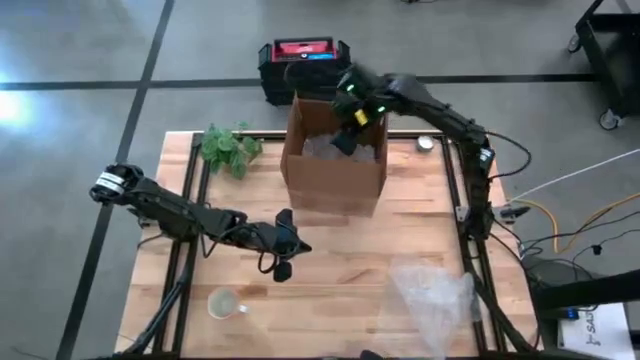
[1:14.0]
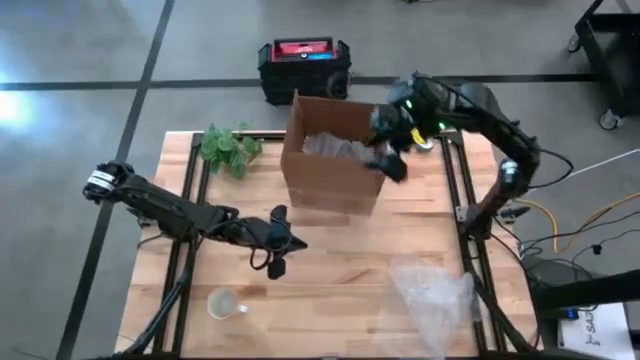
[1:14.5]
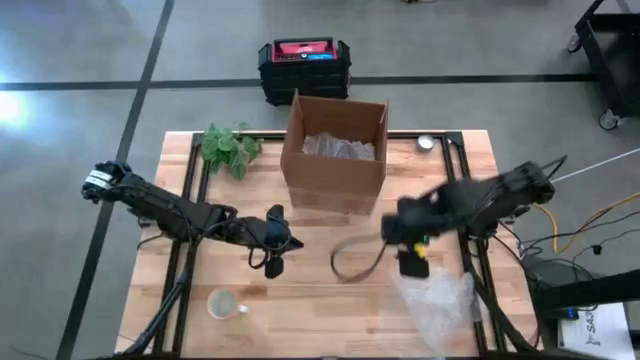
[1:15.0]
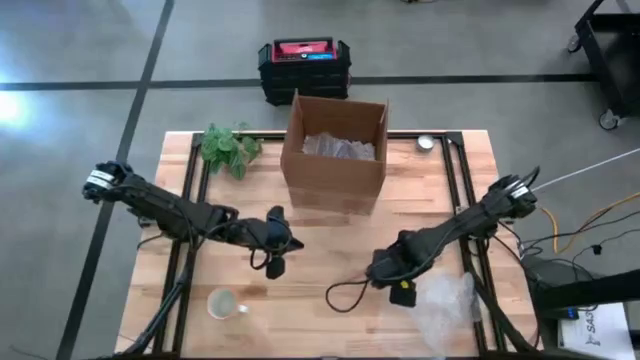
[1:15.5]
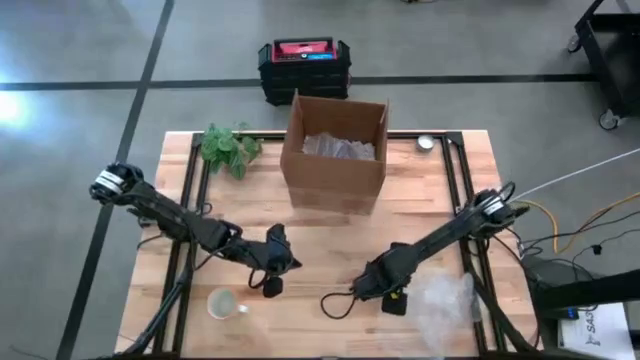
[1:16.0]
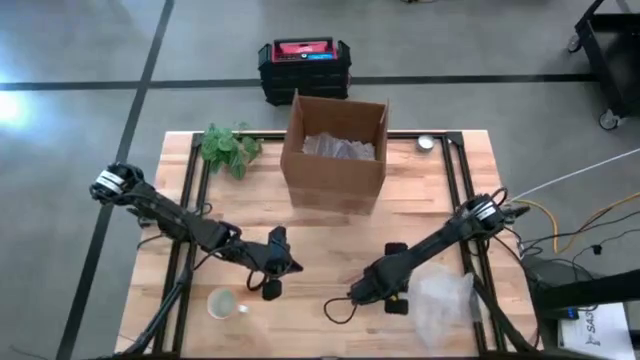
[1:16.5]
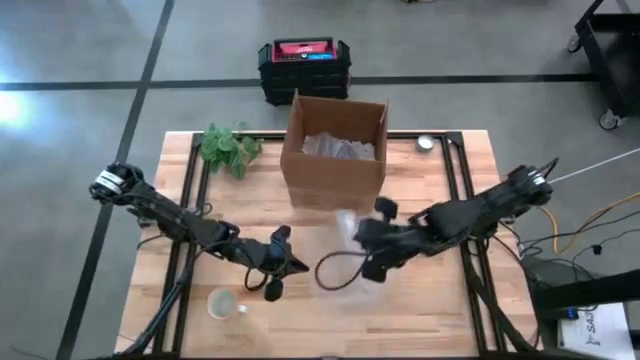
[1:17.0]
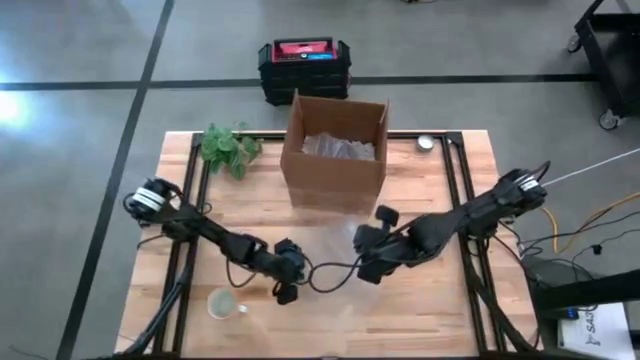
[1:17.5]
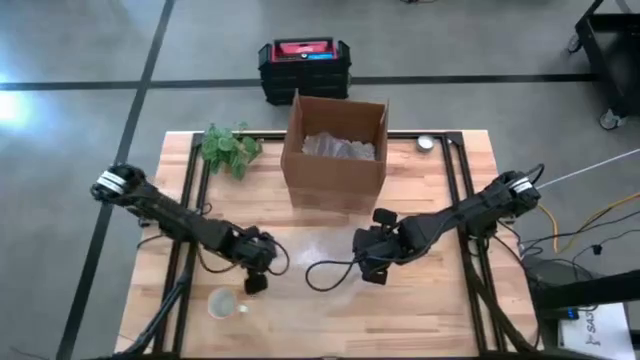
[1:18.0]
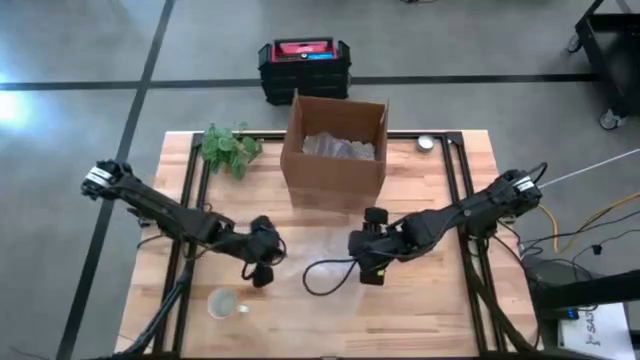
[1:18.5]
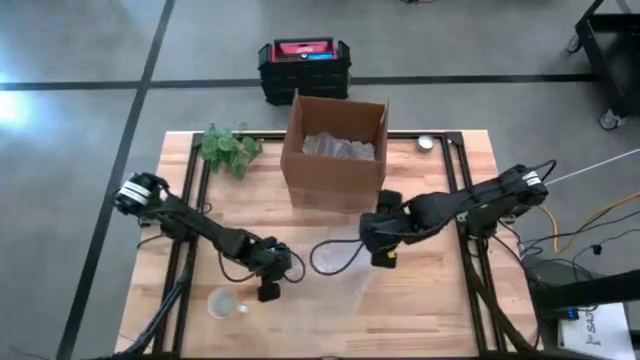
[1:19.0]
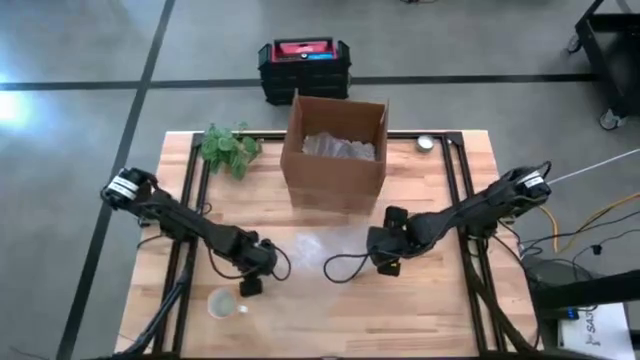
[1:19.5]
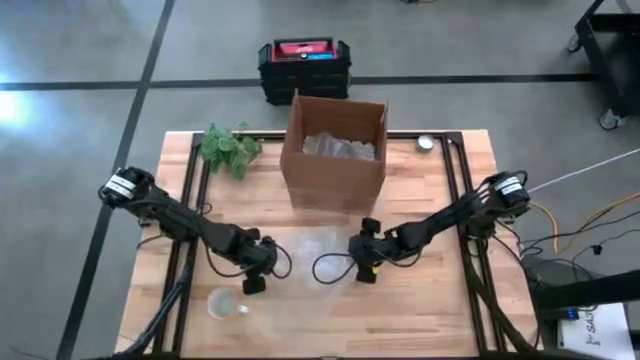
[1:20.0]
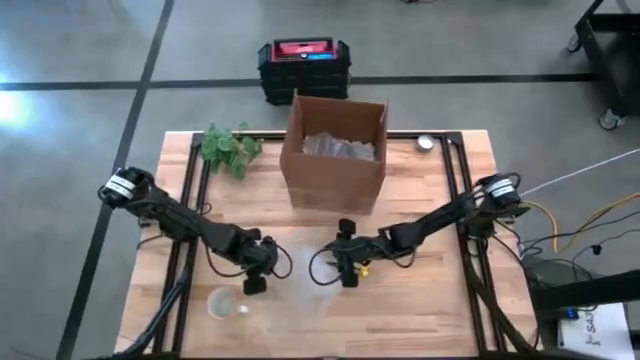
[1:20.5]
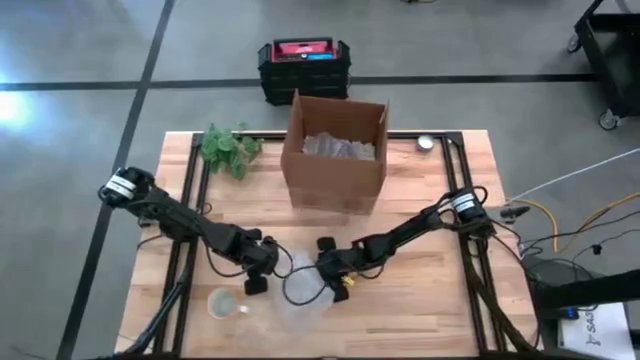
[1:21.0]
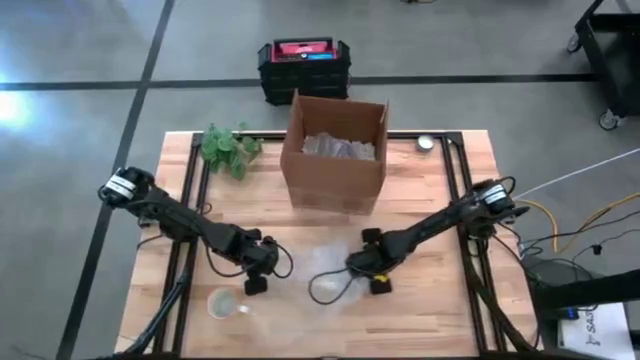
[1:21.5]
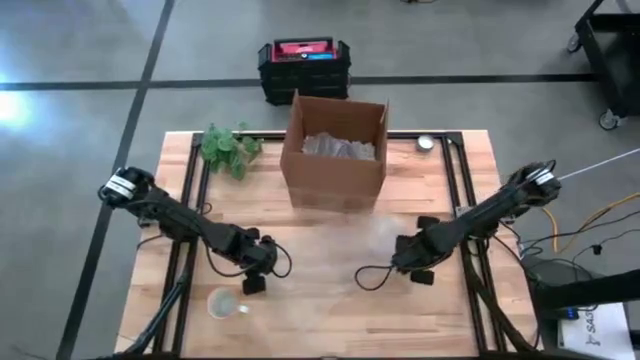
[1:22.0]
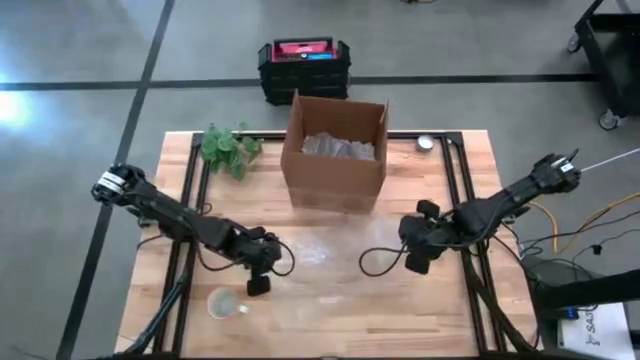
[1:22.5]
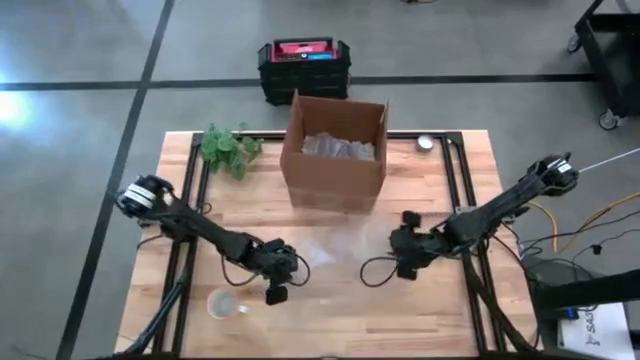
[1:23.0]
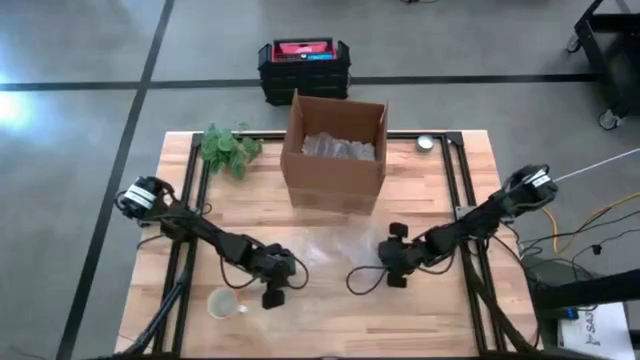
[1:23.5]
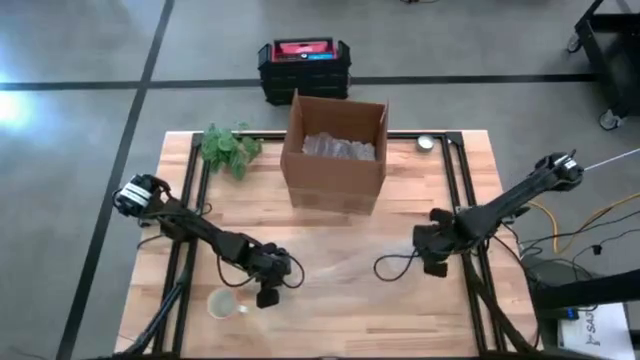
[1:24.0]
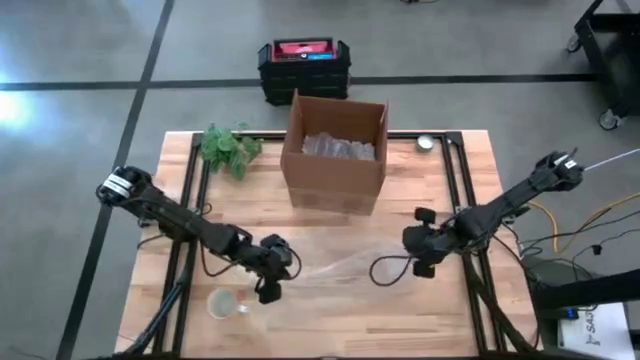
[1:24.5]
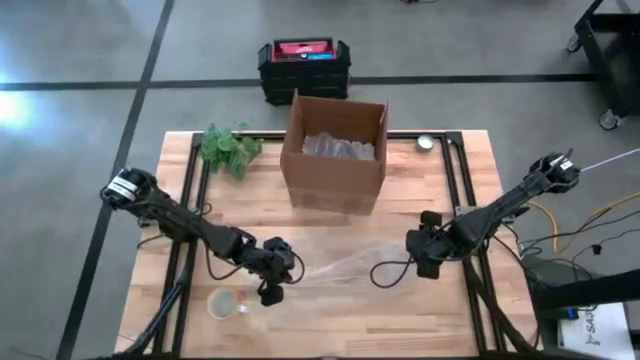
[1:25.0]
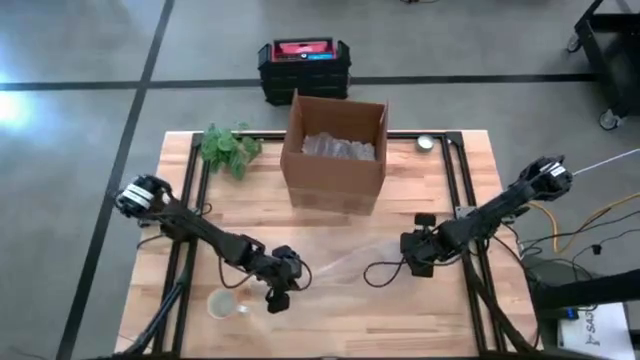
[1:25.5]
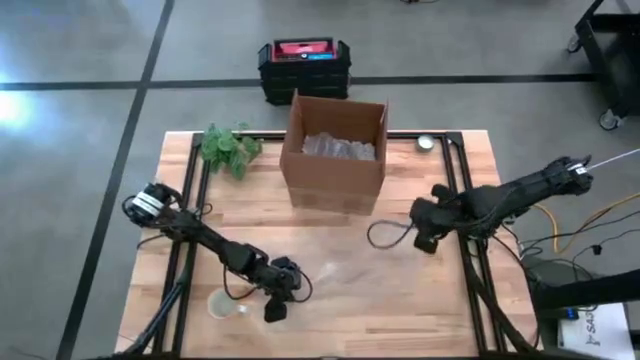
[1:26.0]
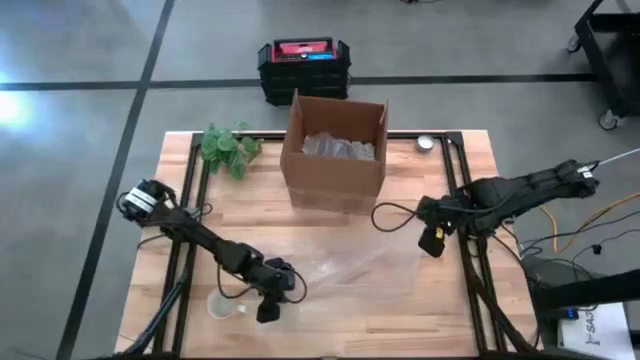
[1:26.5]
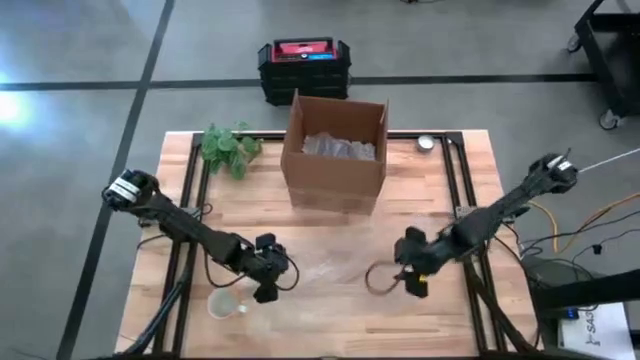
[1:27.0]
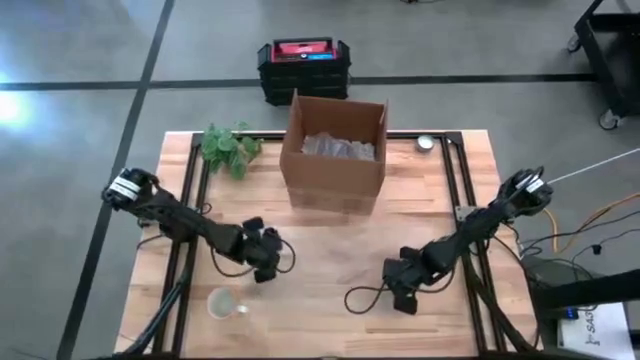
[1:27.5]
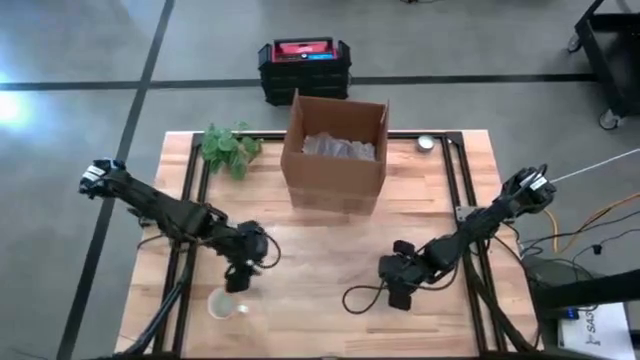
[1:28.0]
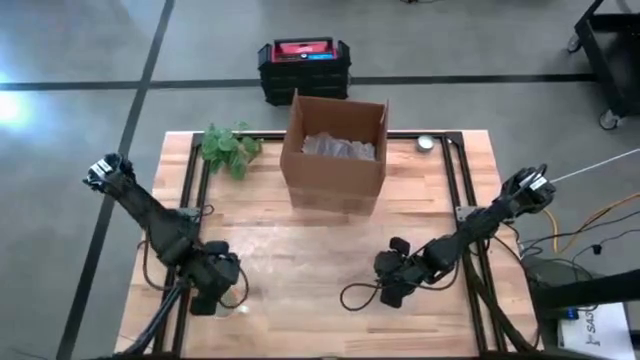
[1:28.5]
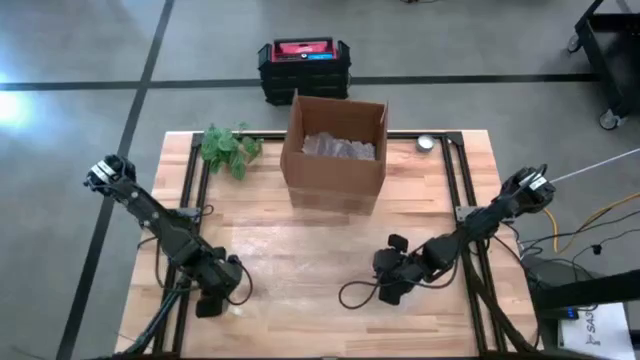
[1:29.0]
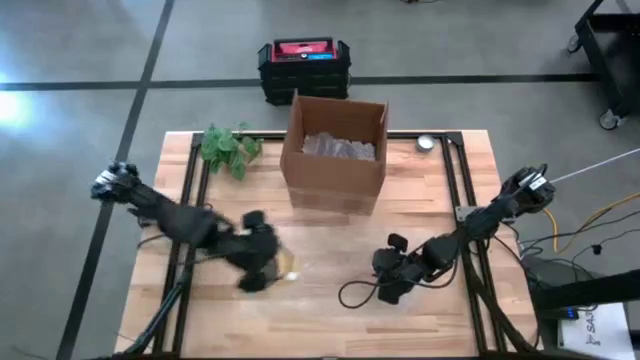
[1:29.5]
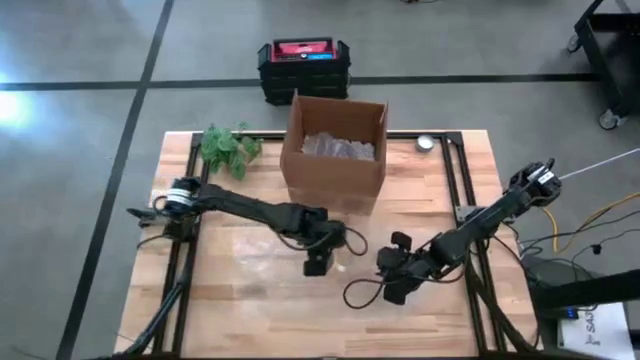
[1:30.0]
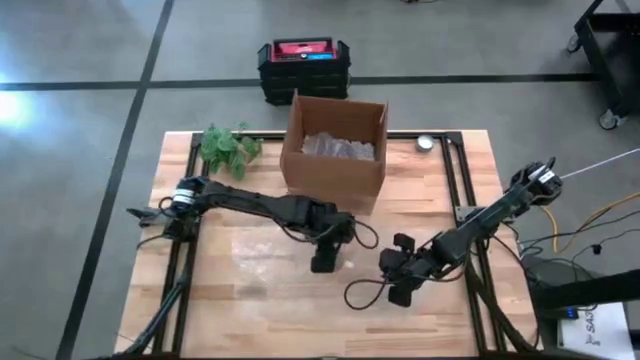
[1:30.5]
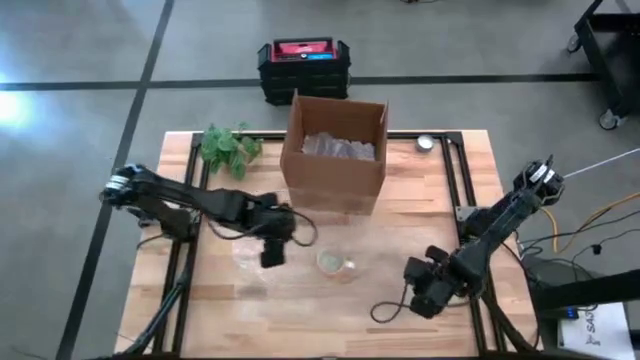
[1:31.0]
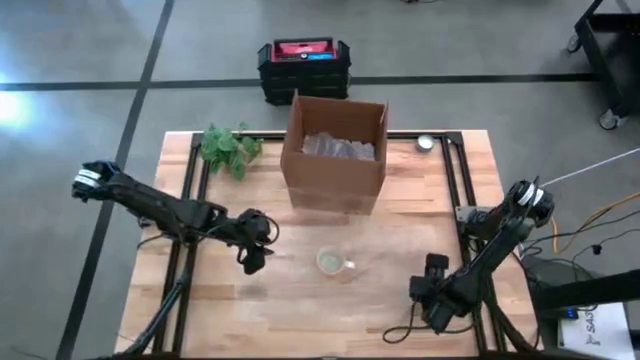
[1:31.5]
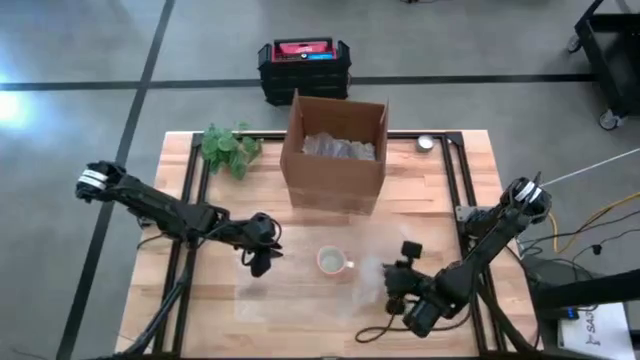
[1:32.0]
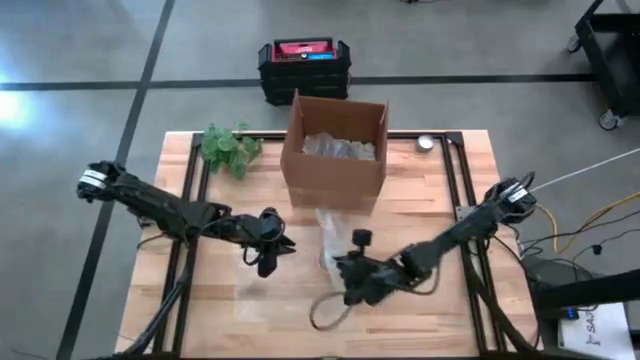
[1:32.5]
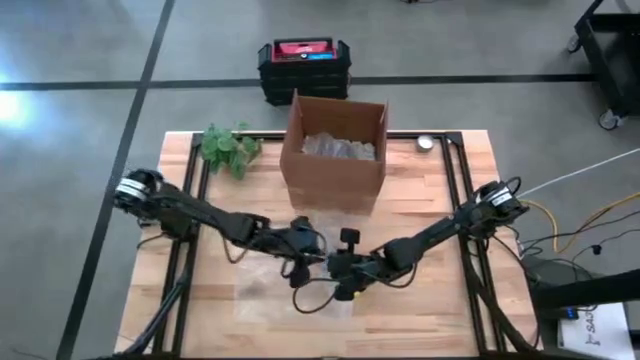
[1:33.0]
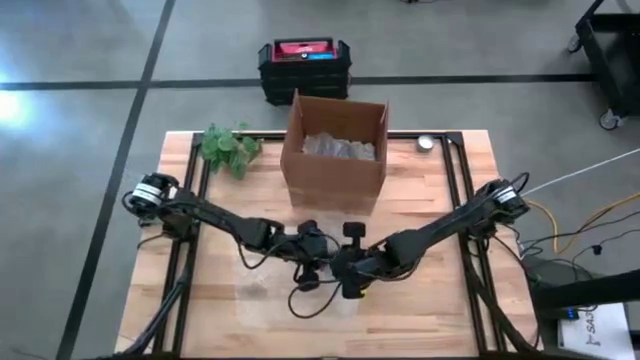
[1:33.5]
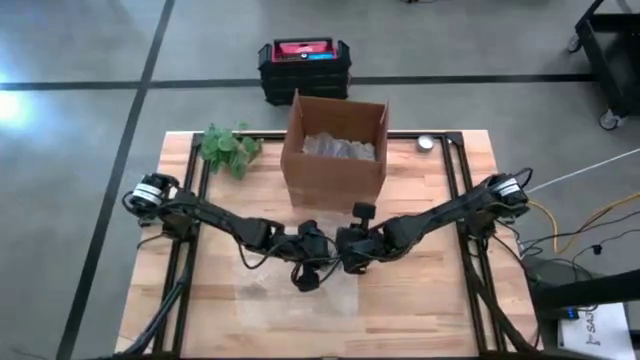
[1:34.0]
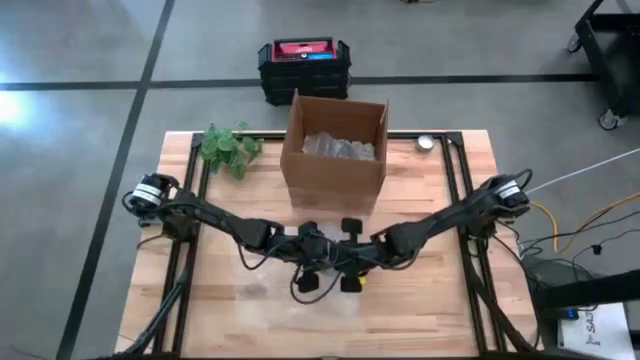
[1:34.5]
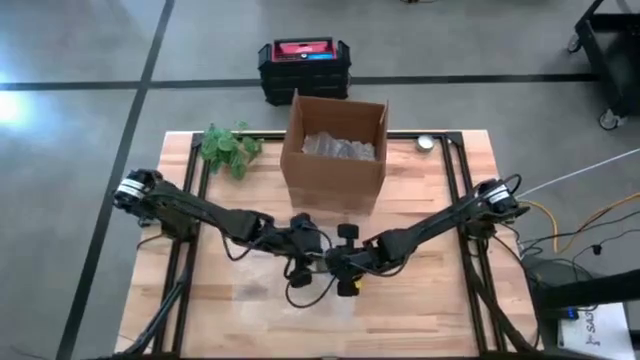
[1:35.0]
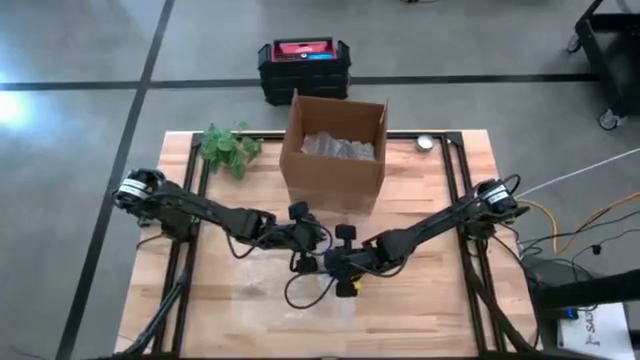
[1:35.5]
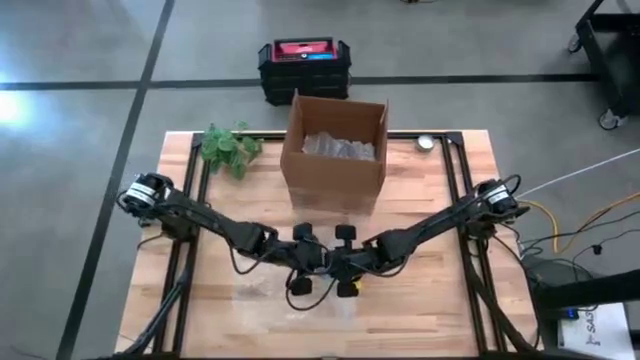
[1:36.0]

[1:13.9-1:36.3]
Task: wrap mug
Wrap the yellow cup in bubble wrap
